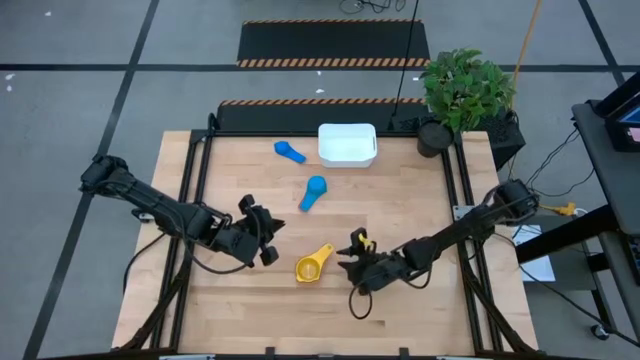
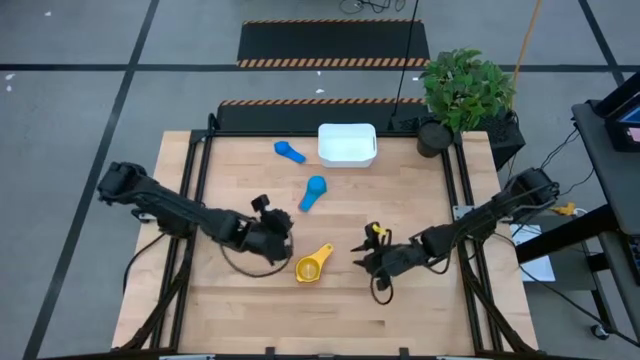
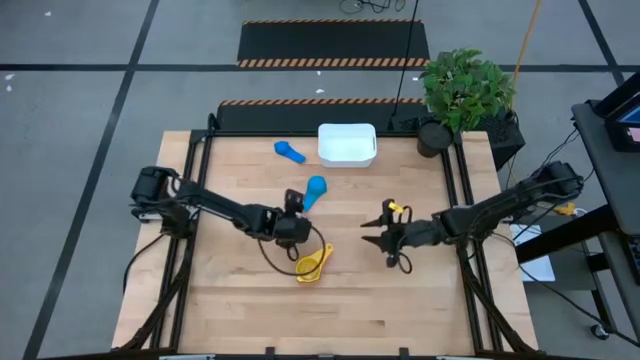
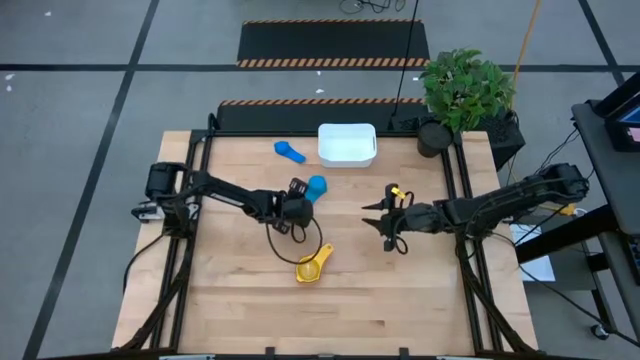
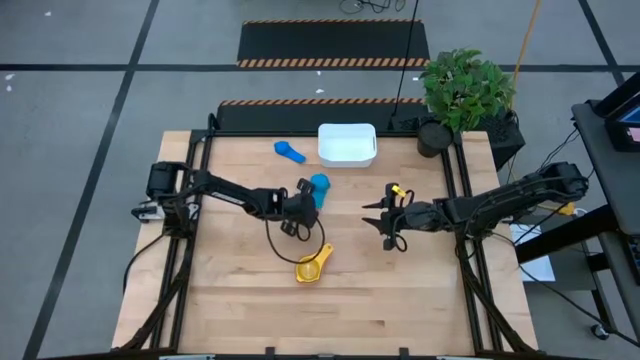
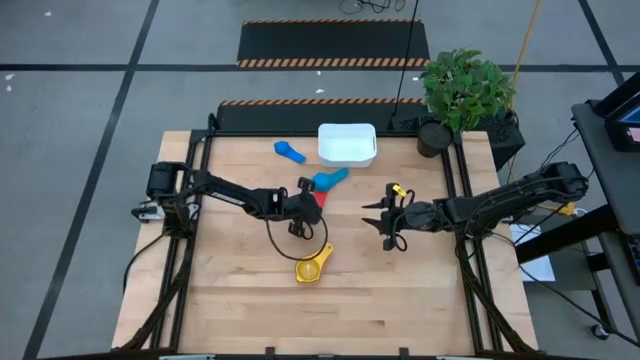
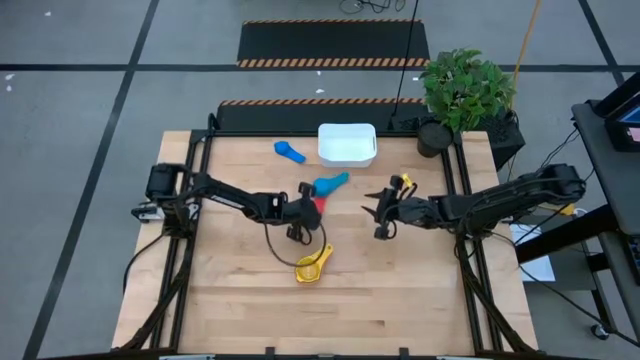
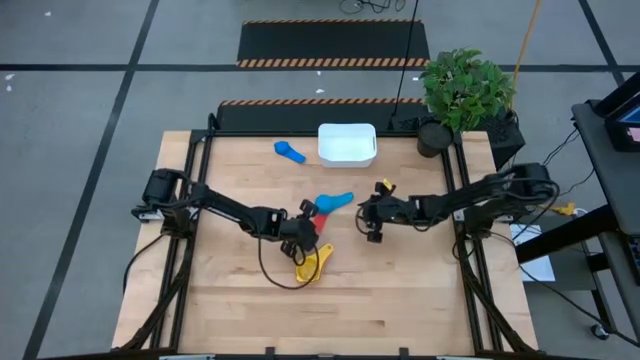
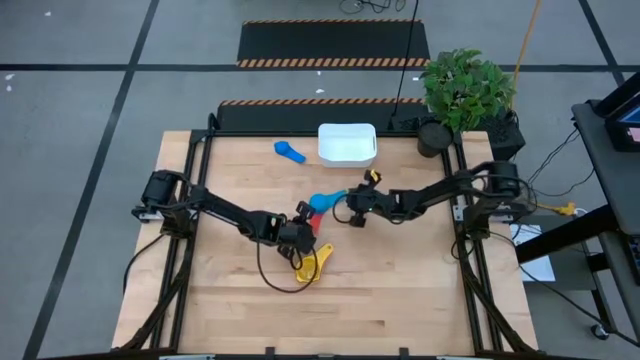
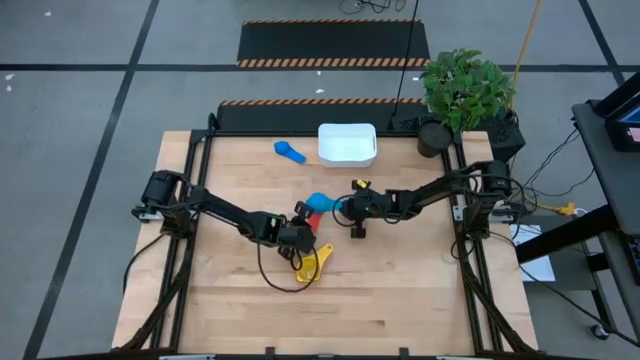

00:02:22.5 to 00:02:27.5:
Task: Nest measuring cups in basket
Adjust the stack measuring cups

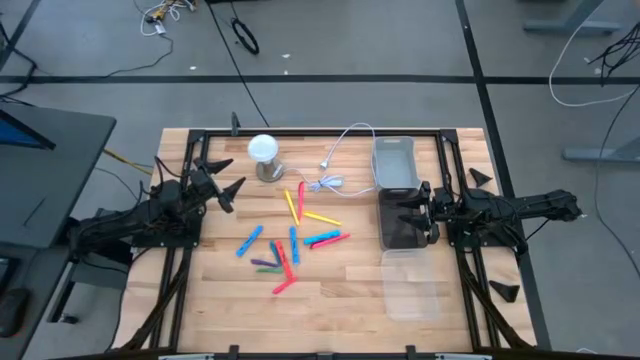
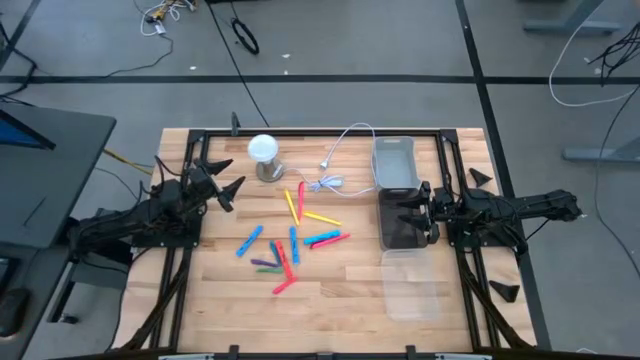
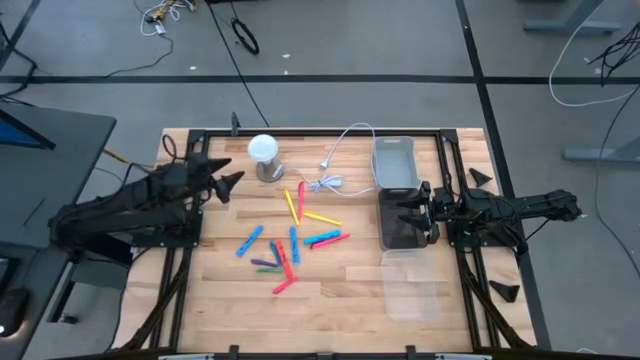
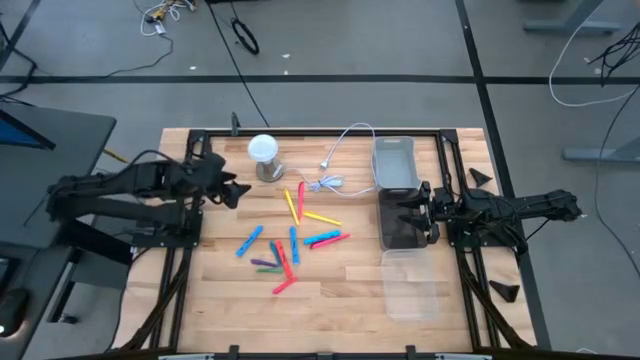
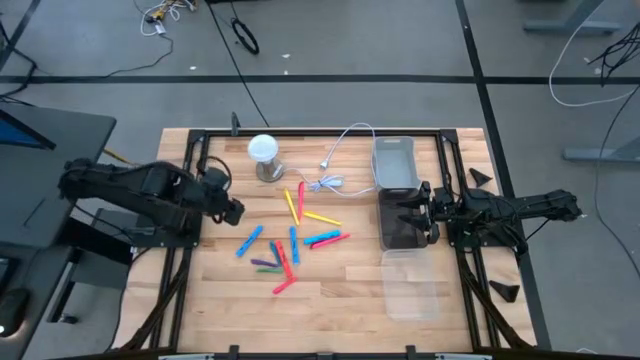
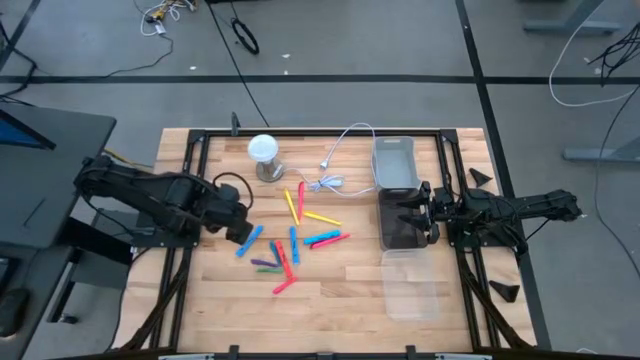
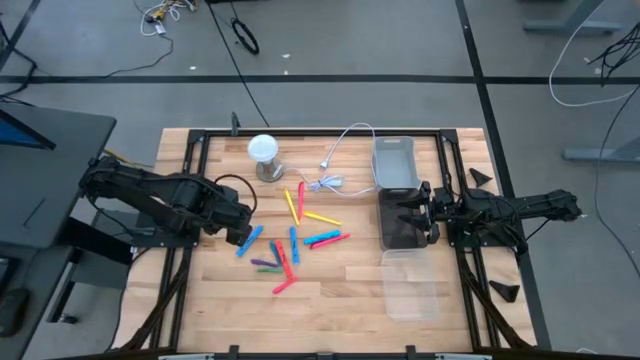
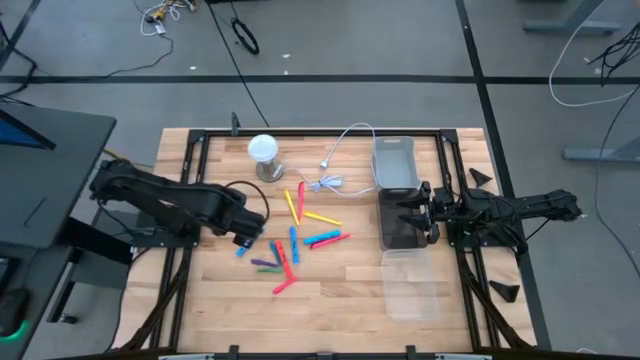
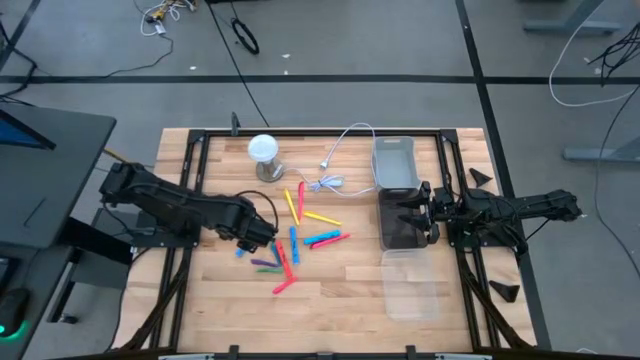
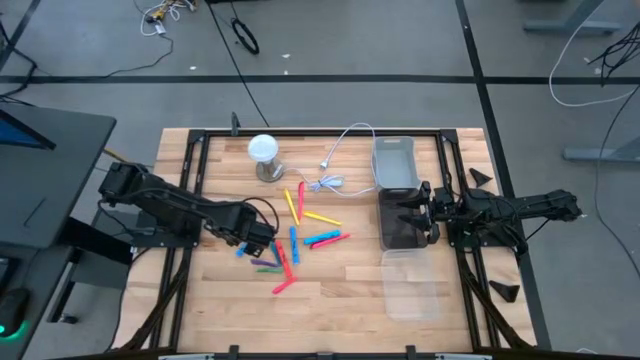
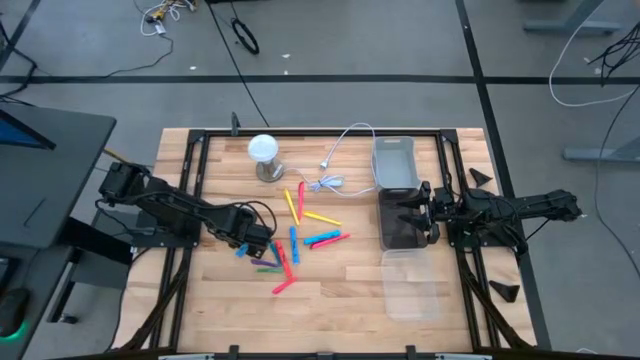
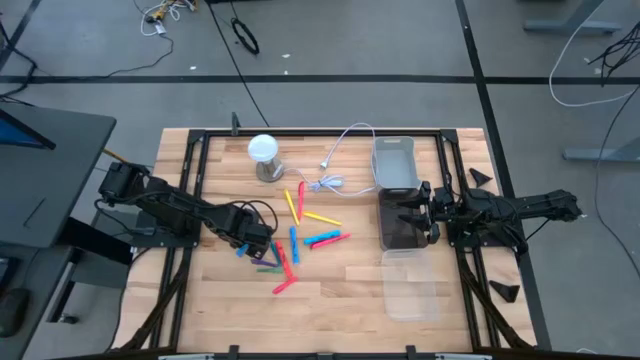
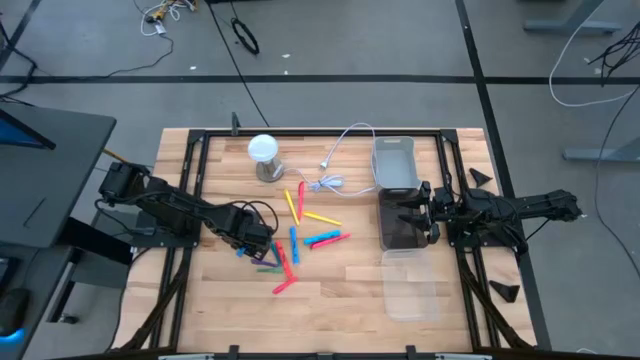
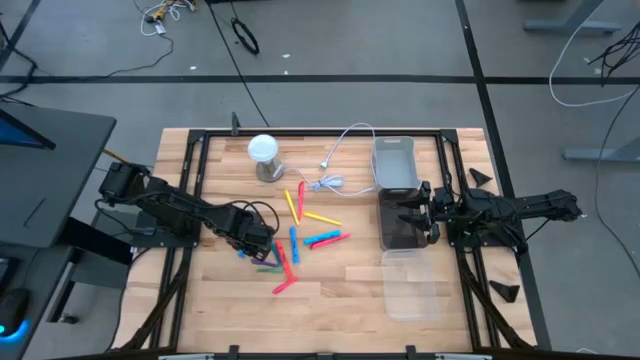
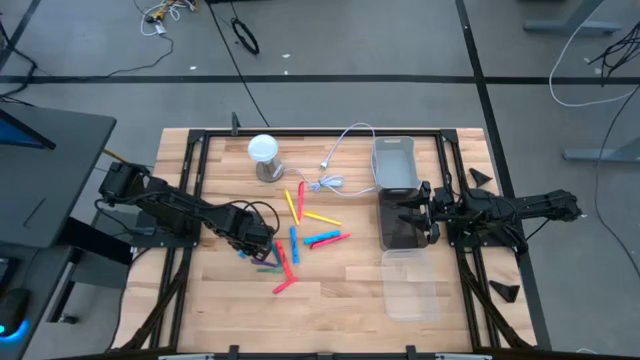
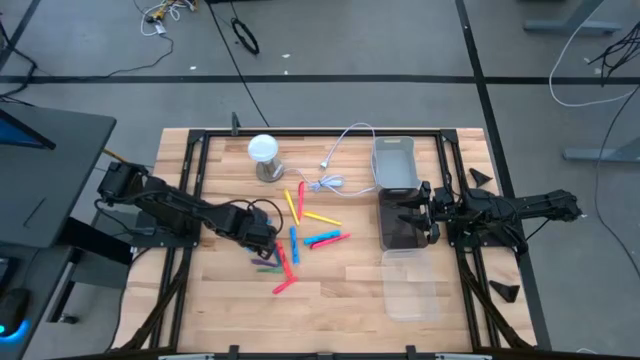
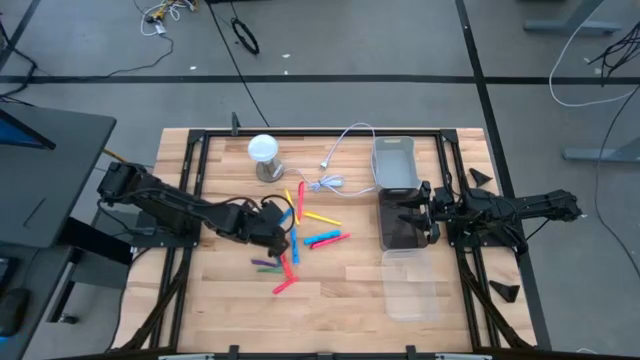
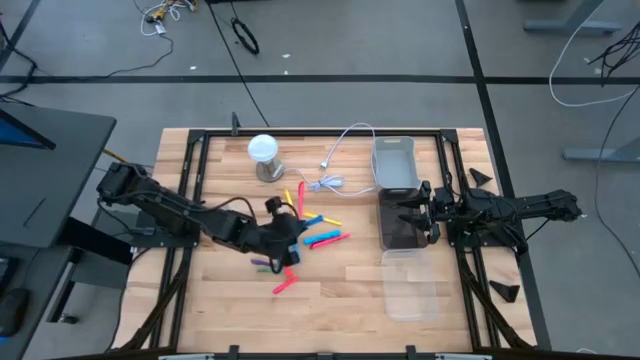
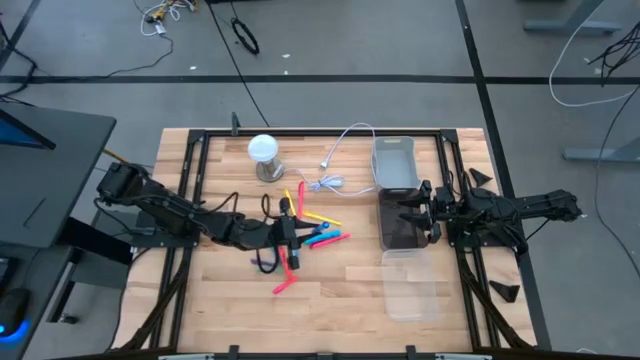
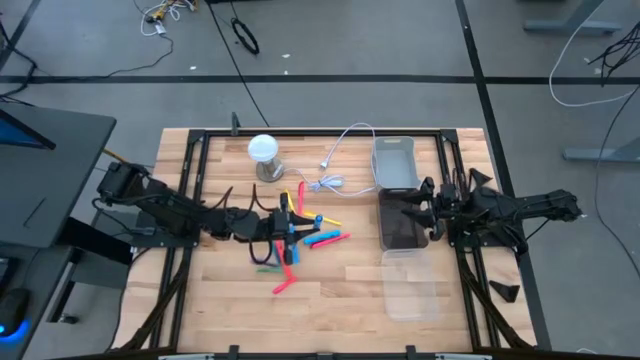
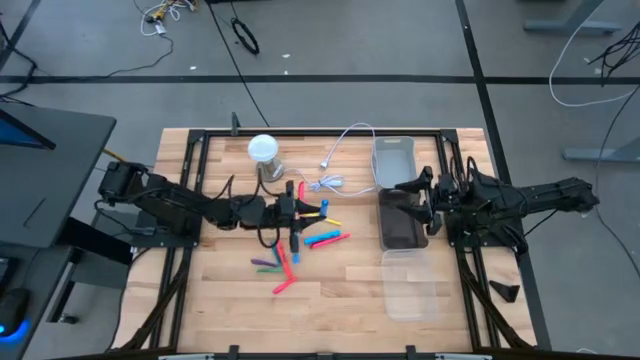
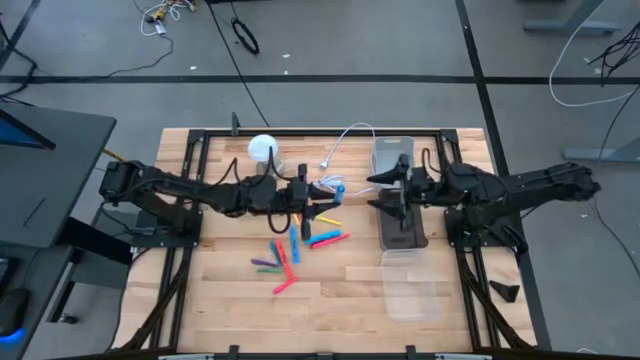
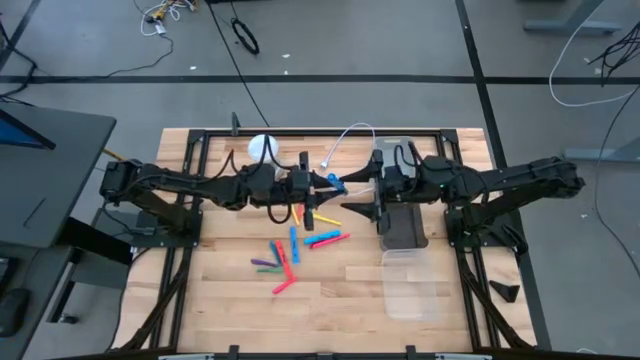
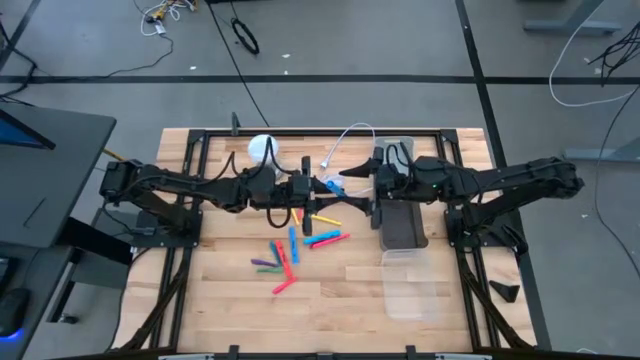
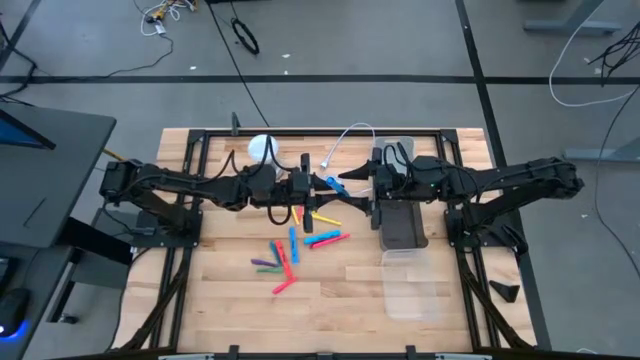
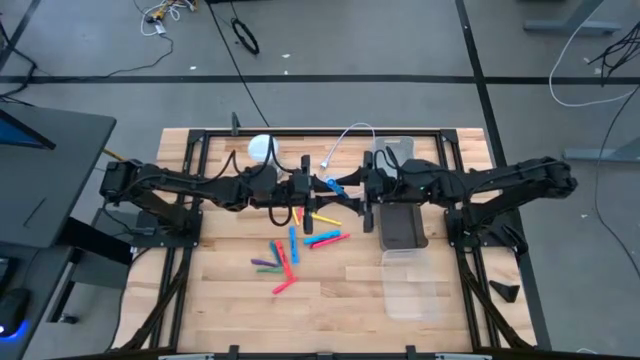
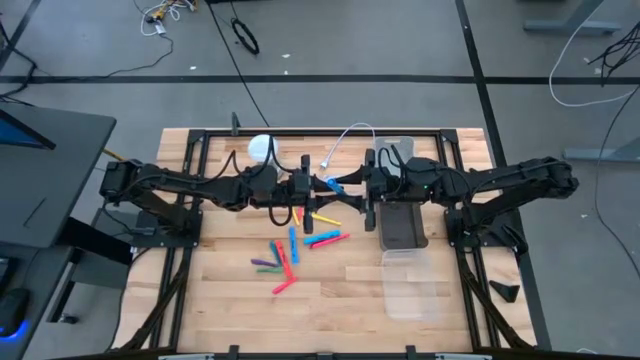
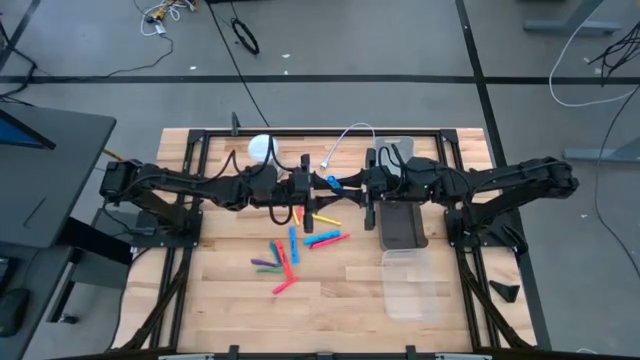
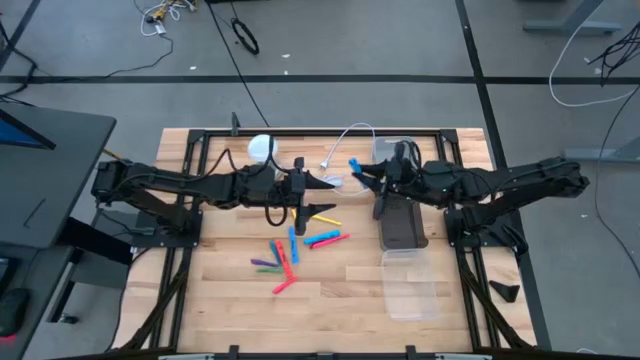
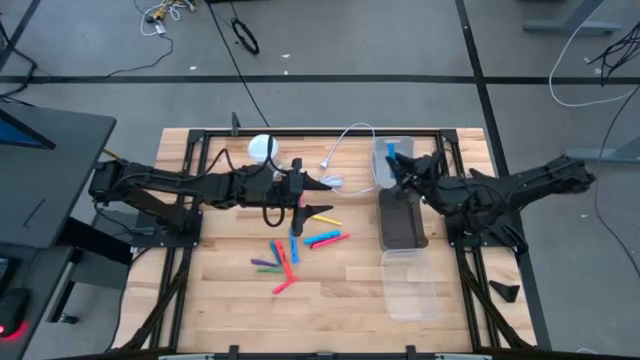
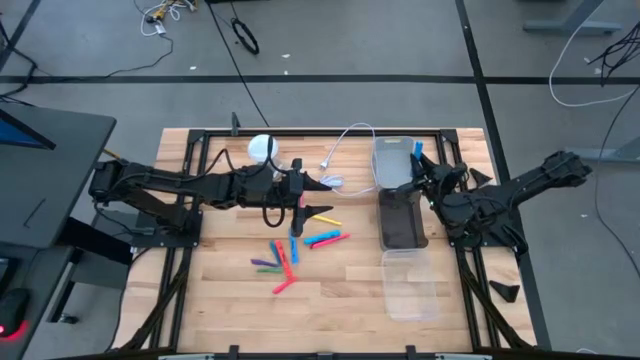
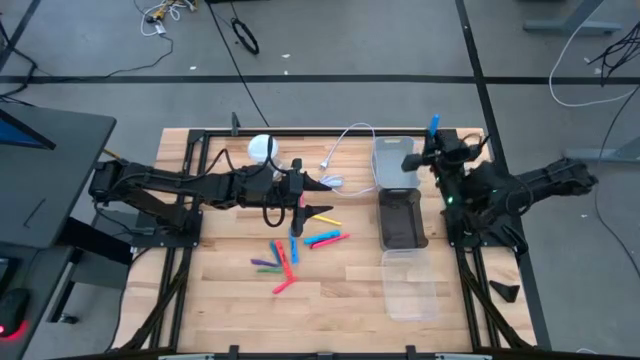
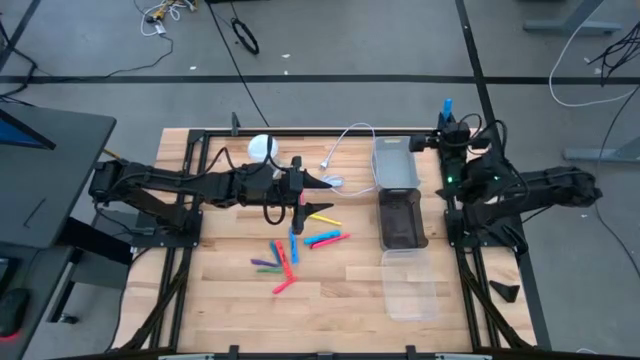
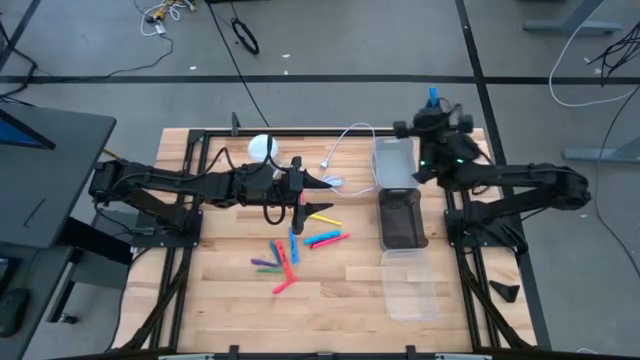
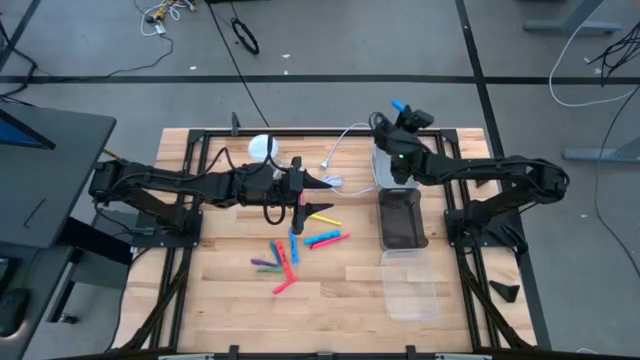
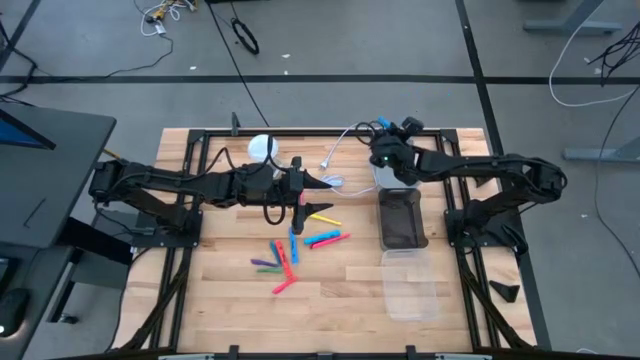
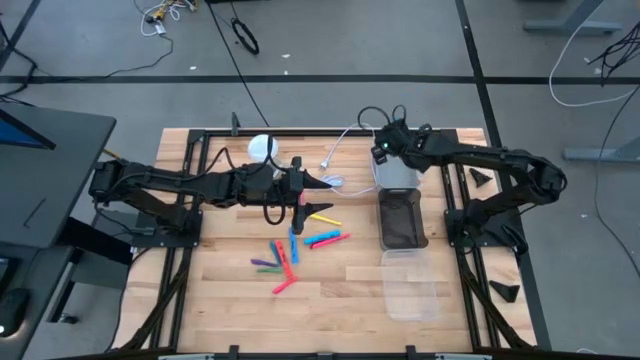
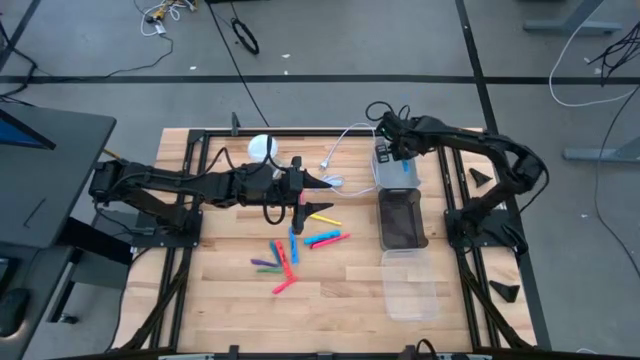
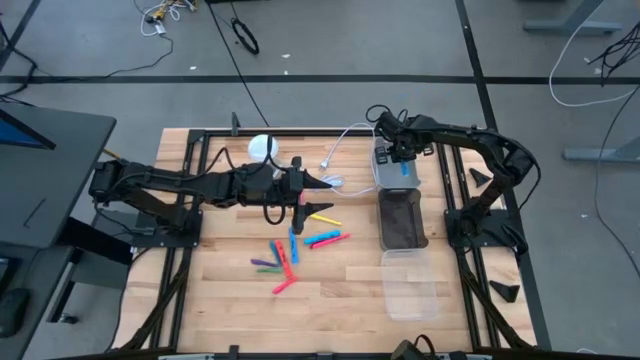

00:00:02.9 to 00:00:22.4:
Task: Pick & Place Markers
Put the left blue highlighter into the gray bin
